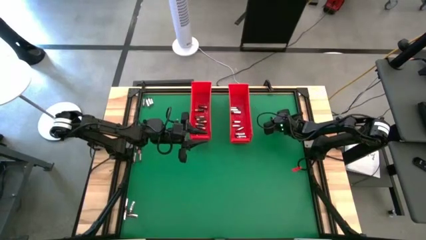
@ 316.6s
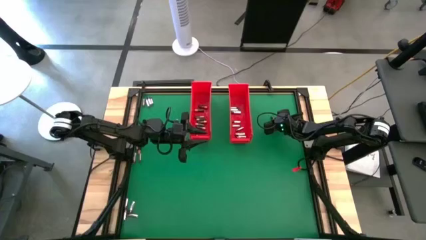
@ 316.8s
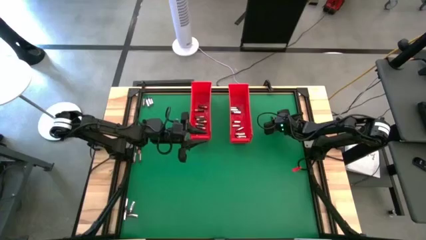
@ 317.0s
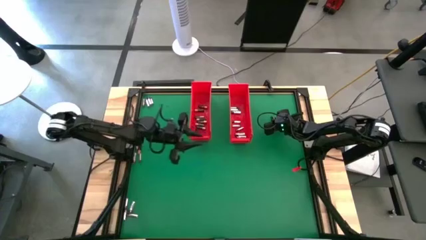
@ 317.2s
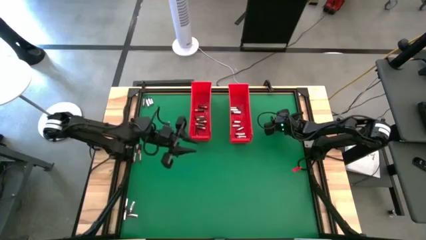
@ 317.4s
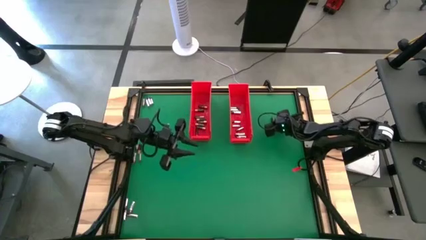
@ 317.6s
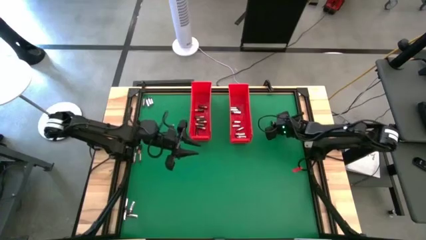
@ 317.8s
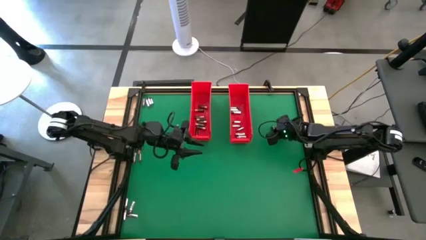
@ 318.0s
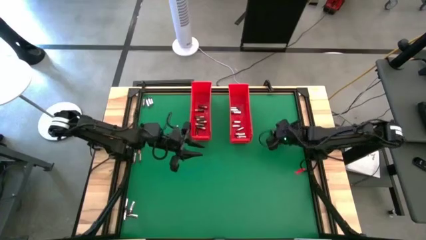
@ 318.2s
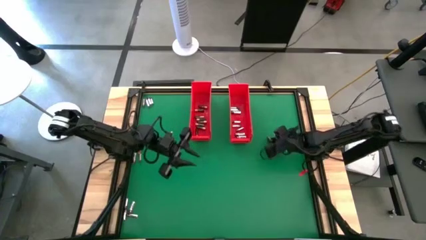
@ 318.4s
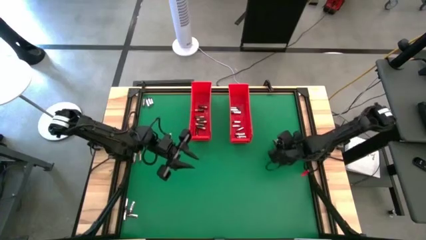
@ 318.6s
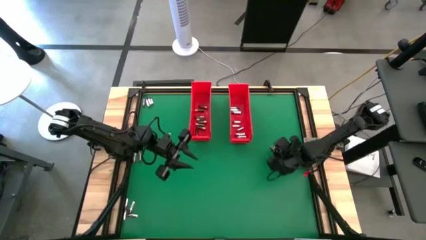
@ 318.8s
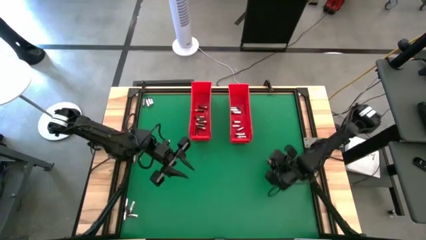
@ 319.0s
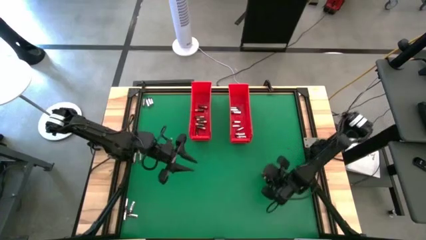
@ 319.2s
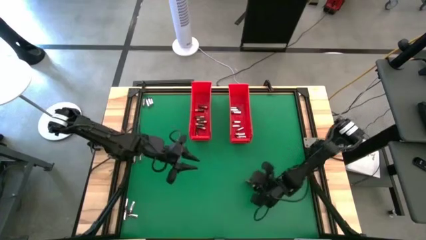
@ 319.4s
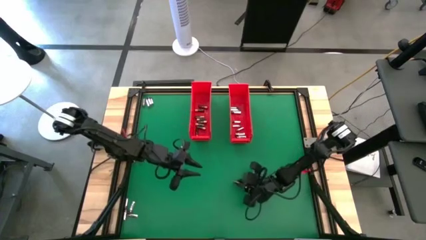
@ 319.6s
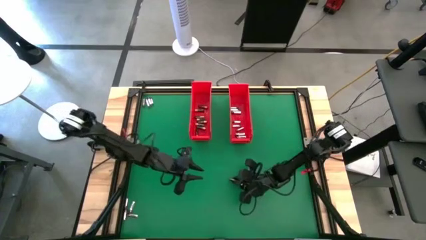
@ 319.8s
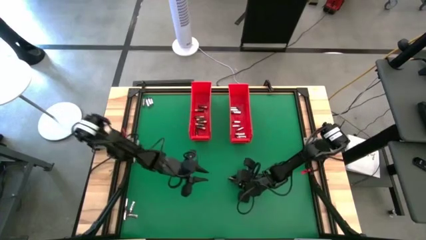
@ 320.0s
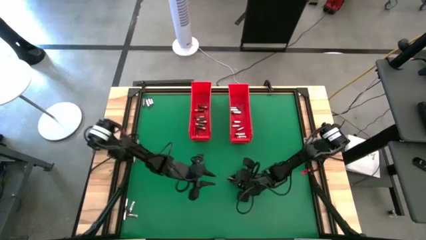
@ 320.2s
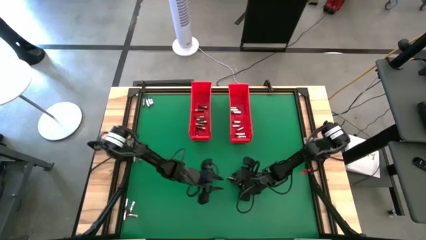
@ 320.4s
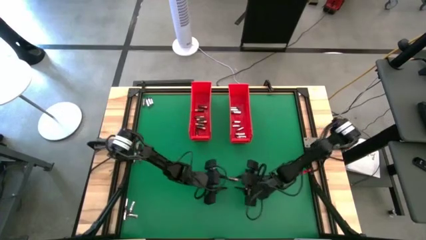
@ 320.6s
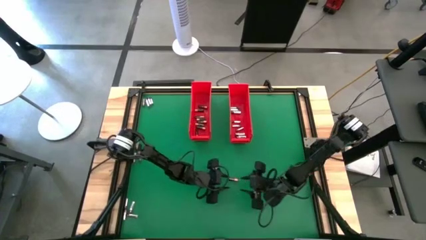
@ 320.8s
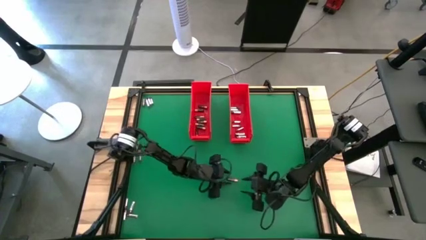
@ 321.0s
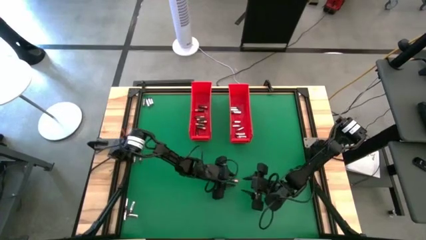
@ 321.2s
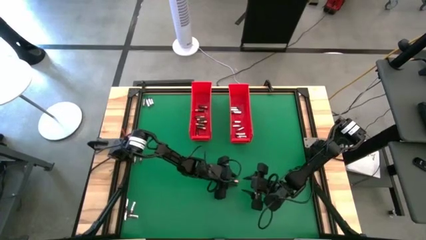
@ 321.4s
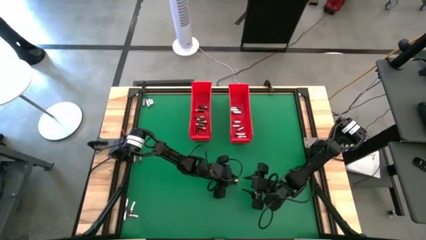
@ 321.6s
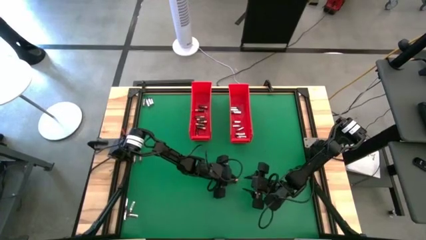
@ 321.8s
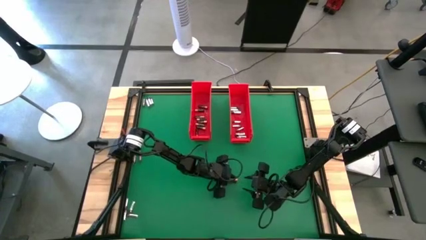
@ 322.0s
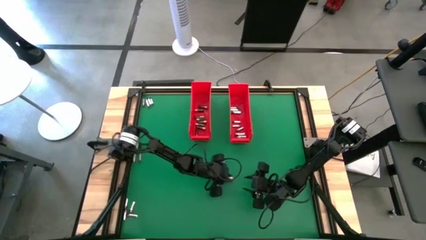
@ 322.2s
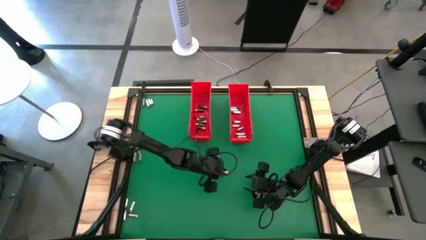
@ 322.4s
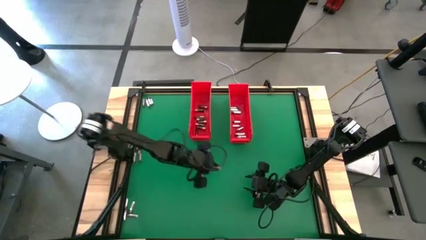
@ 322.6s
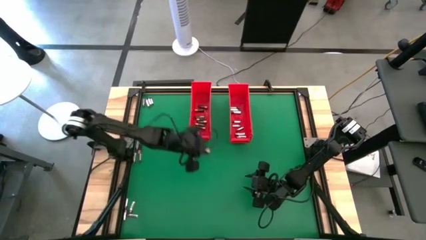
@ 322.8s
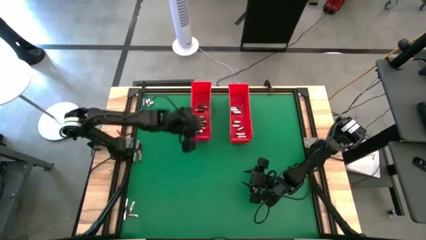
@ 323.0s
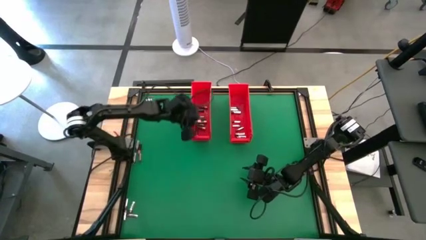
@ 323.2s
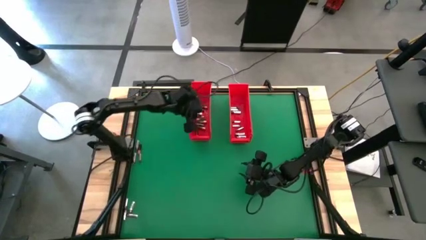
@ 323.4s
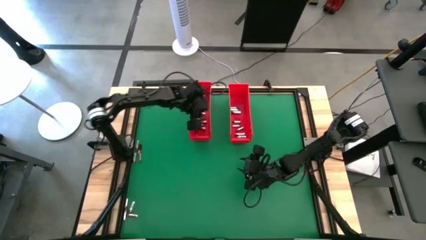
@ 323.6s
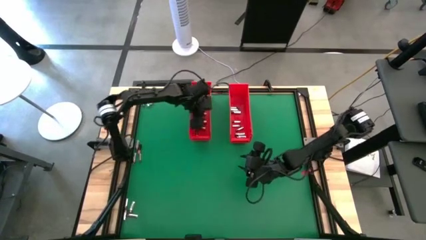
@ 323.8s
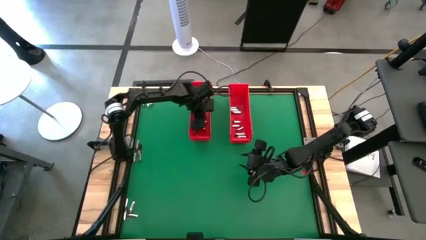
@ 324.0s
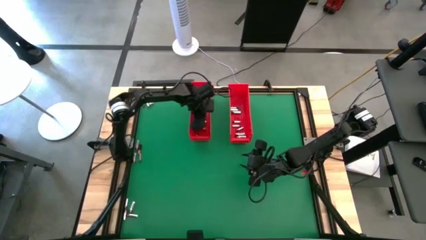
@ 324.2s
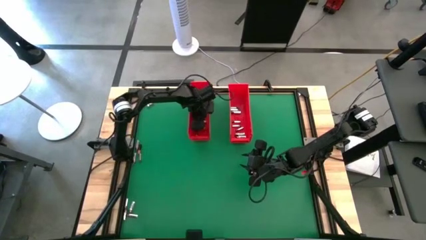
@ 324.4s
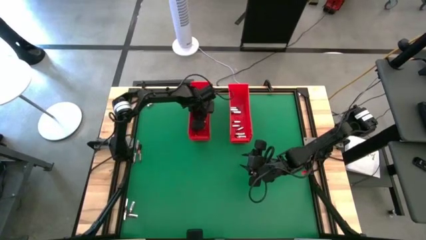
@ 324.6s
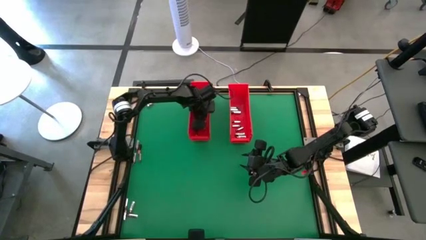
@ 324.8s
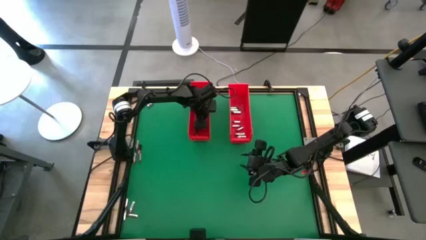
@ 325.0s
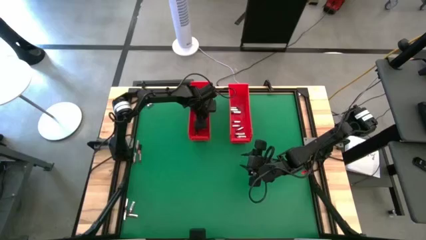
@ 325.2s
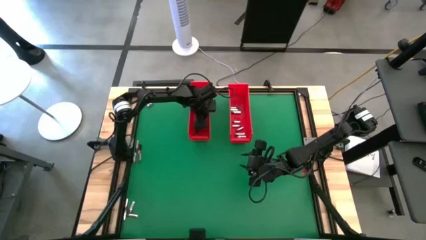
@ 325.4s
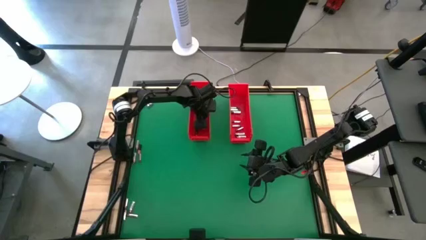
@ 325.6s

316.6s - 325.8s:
Task: Sort batteries
Put the brown battery into the left red bin

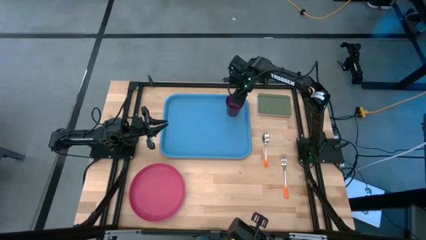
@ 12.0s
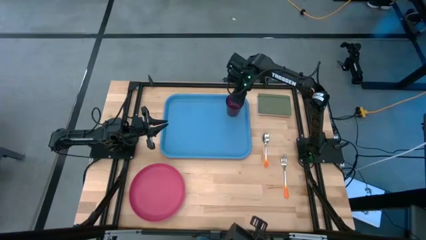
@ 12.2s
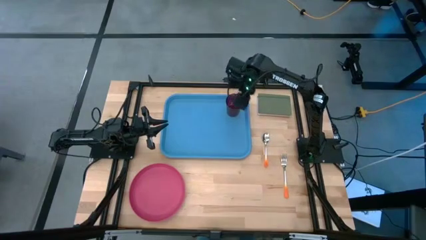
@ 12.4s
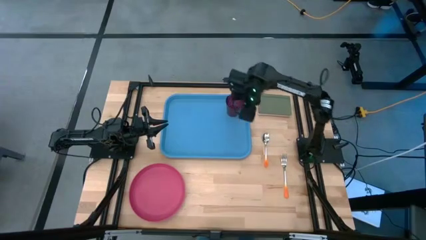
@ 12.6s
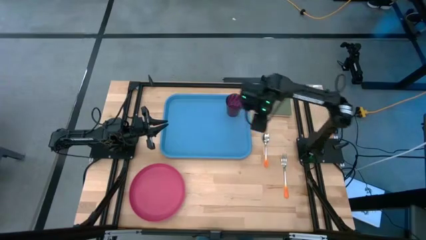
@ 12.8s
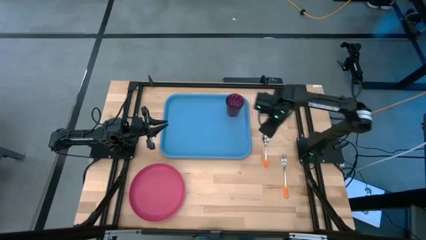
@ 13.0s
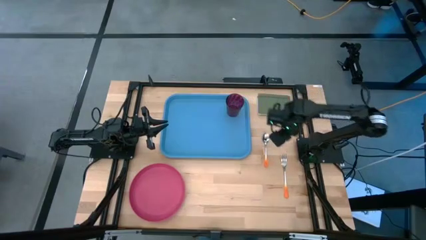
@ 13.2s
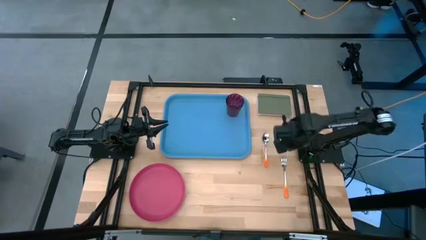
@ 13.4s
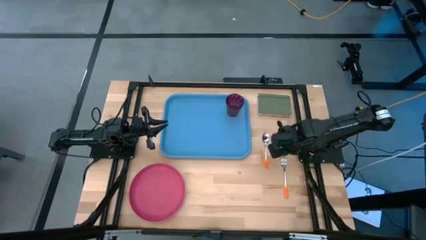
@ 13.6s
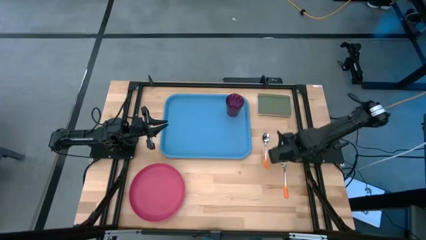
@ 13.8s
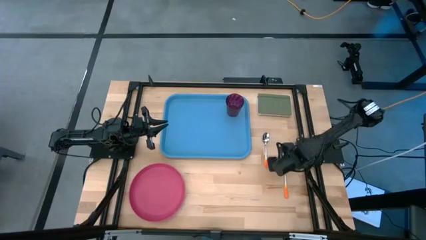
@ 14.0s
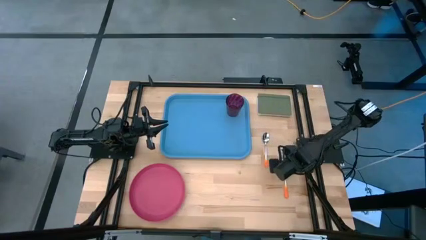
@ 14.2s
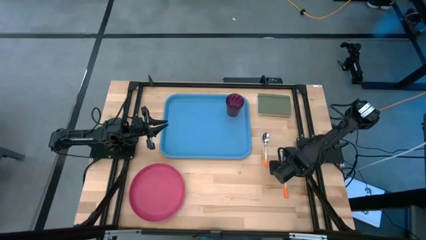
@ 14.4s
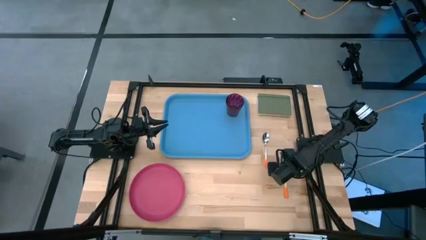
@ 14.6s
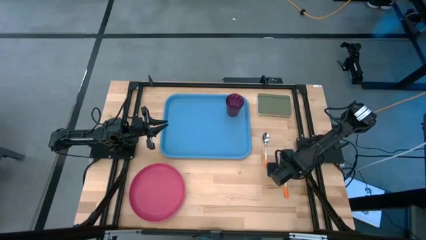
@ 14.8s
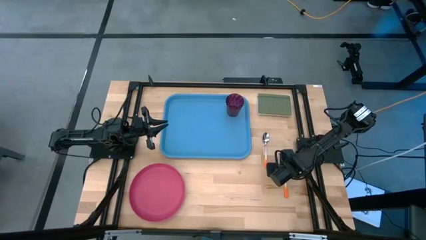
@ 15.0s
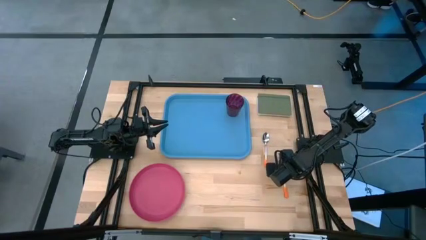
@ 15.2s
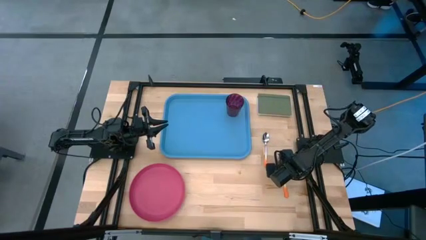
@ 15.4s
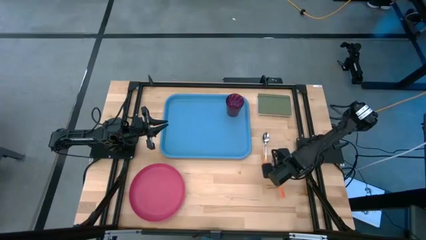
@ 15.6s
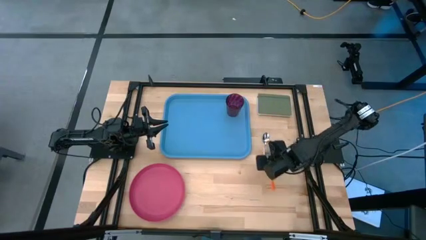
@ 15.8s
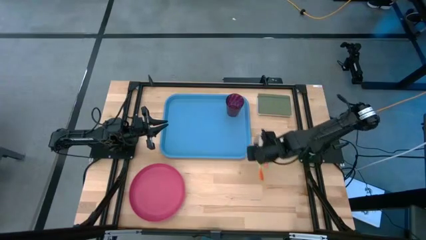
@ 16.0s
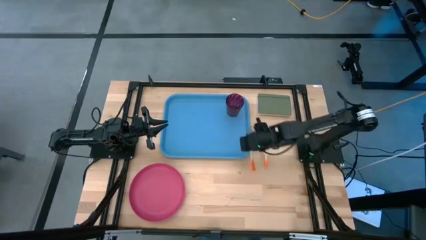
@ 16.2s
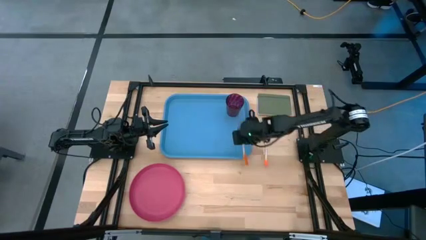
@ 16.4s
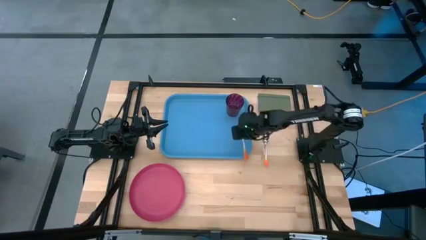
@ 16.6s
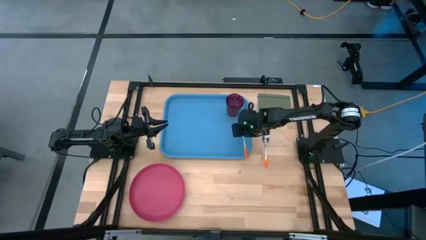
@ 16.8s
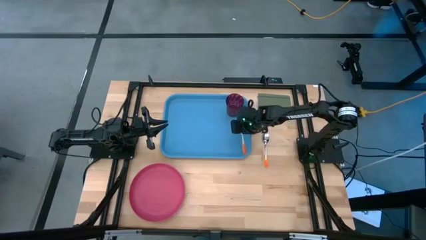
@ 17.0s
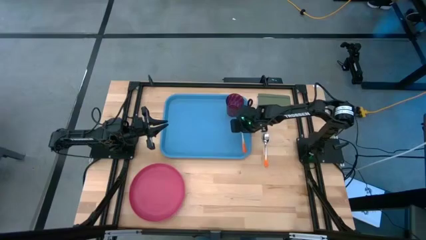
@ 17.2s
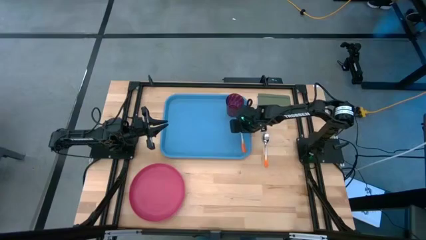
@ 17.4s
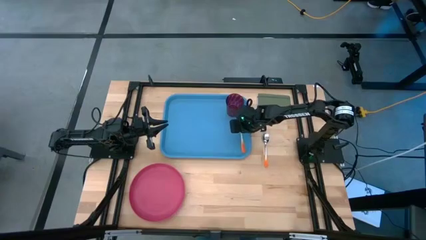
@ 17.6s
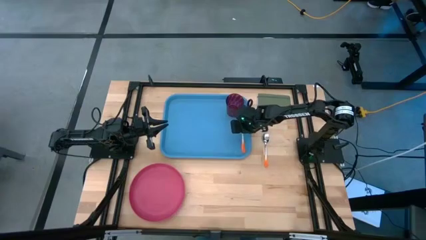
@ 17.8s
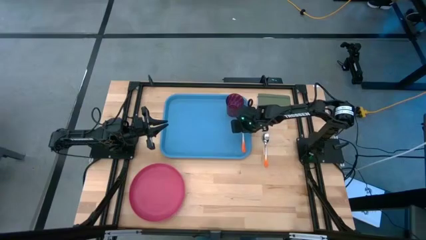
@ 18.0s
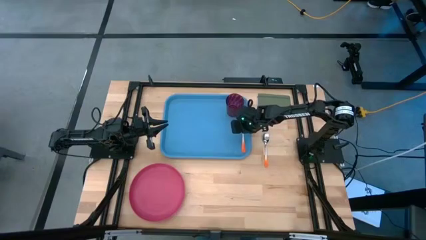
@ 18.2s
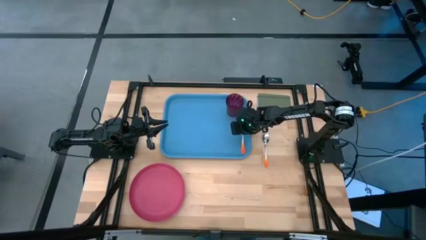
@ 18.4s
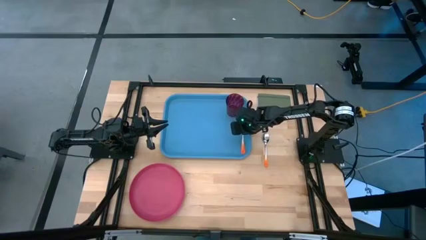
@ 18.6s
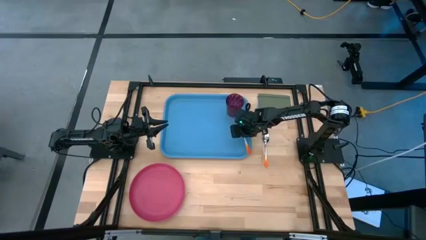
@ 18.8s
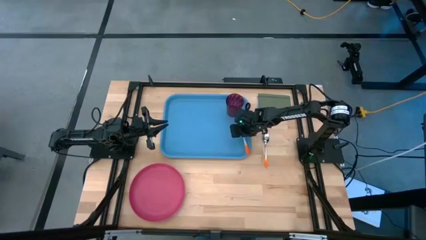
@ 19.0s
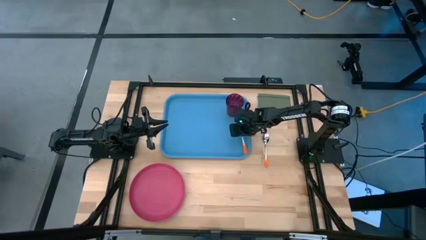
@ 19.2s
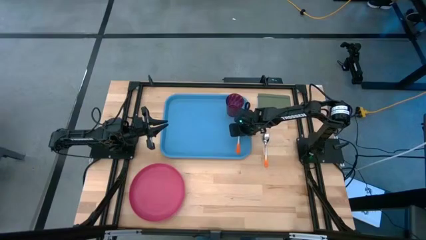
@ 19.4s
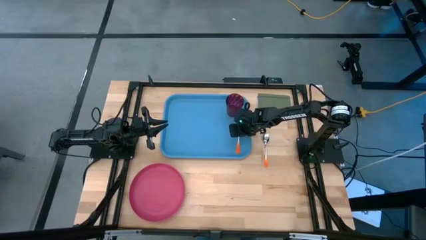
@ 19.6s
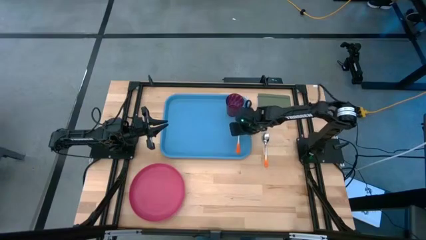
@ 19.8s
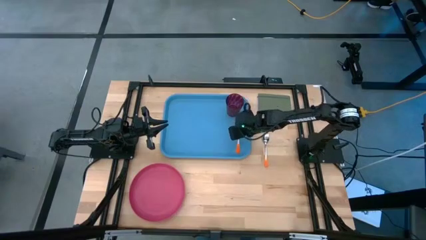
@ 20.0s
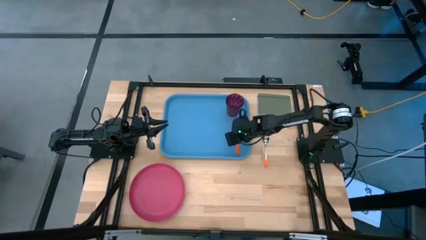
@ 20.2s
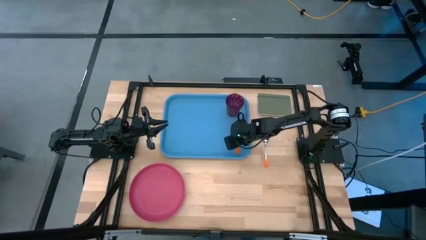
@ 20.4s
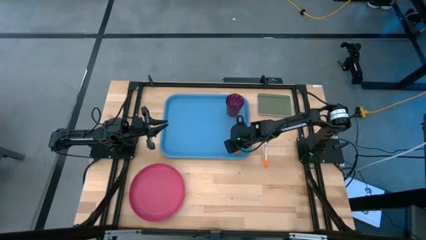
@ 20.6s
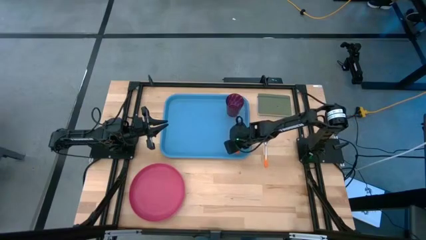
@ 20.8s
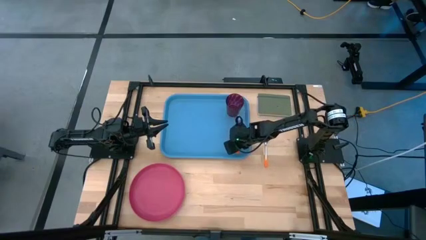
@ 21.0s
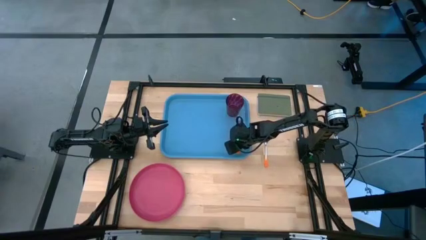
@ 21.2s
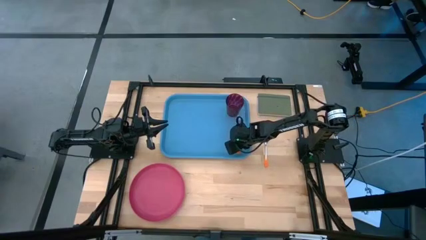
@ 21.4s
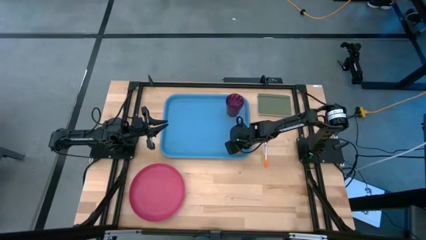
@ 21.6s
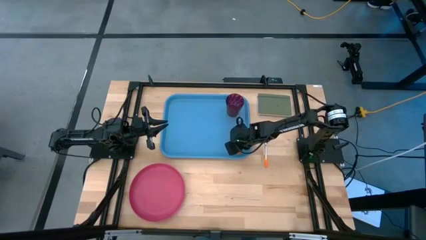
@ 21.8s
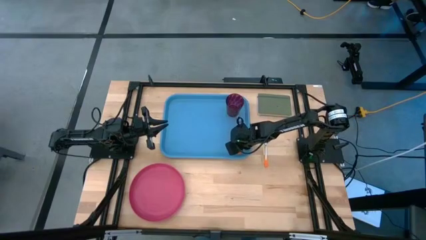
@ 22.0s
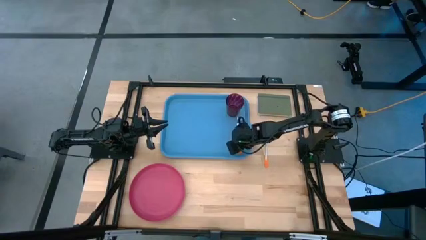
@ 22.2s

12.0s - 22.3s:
Task: Pick and place plate/cup/fork/spoon on tray
Put the orange fork at the bottom of the violet cup on the blue tray
